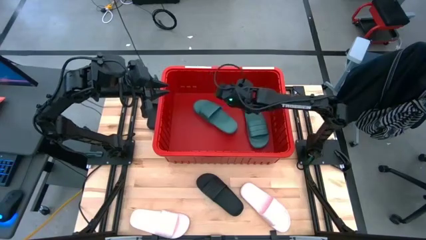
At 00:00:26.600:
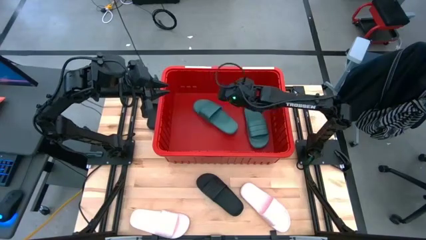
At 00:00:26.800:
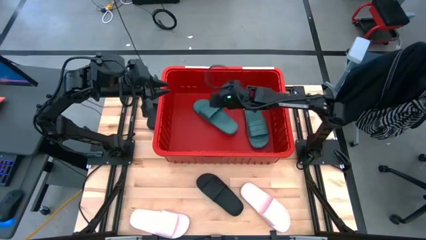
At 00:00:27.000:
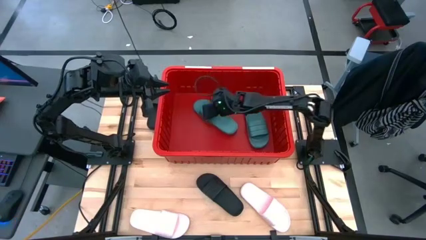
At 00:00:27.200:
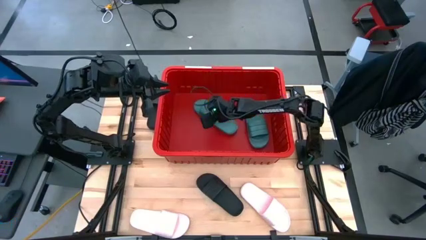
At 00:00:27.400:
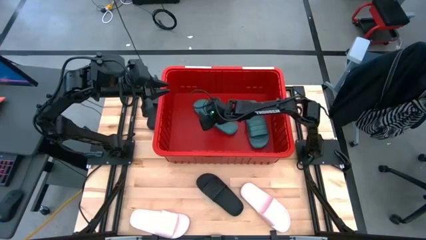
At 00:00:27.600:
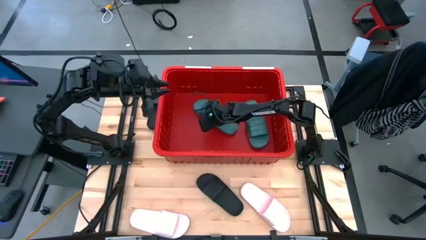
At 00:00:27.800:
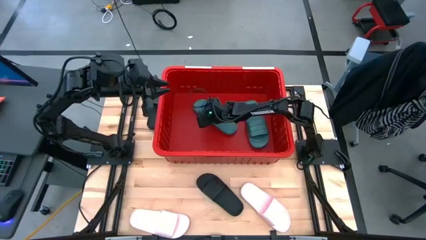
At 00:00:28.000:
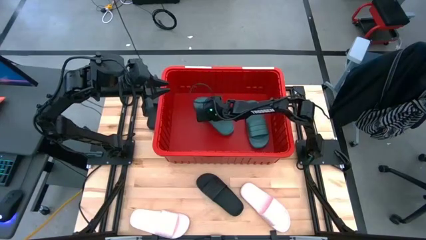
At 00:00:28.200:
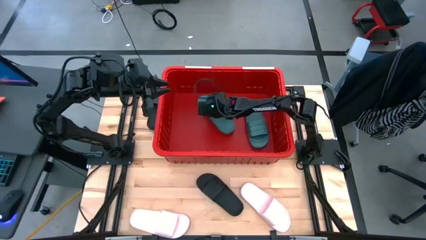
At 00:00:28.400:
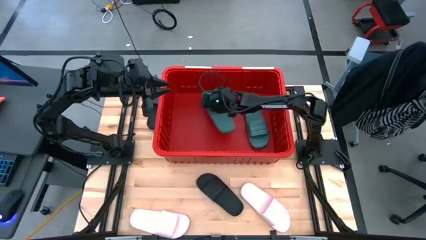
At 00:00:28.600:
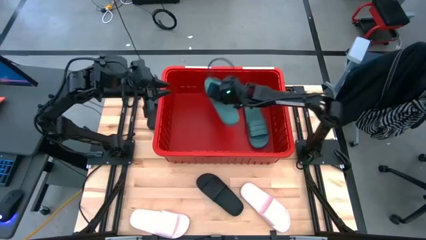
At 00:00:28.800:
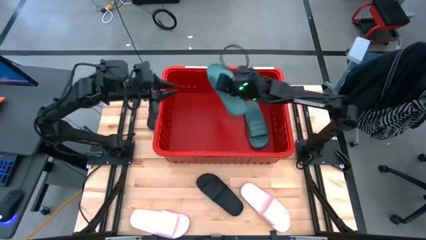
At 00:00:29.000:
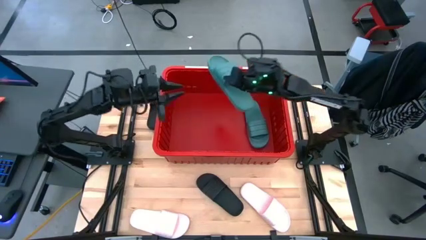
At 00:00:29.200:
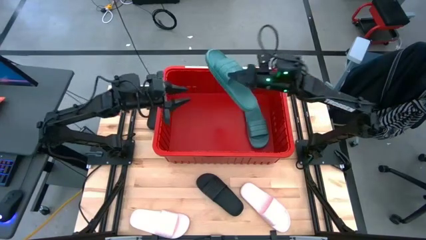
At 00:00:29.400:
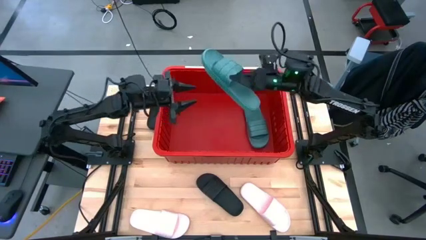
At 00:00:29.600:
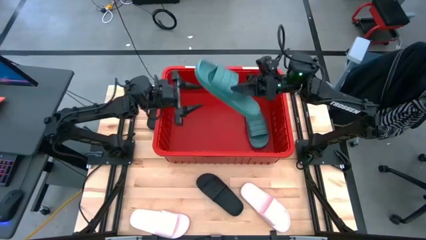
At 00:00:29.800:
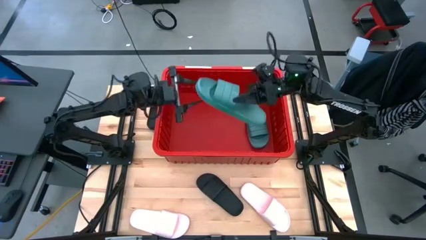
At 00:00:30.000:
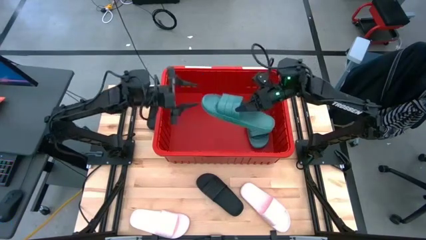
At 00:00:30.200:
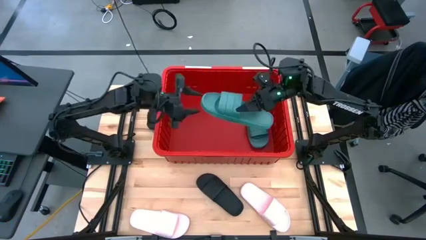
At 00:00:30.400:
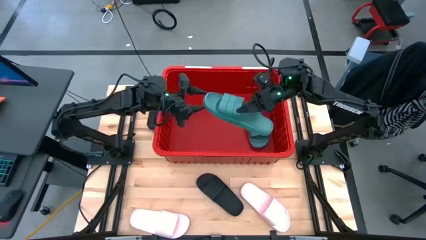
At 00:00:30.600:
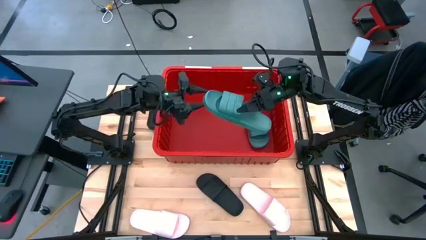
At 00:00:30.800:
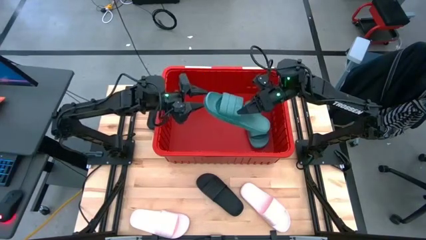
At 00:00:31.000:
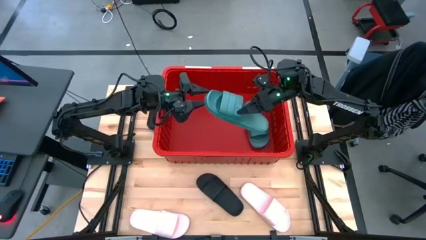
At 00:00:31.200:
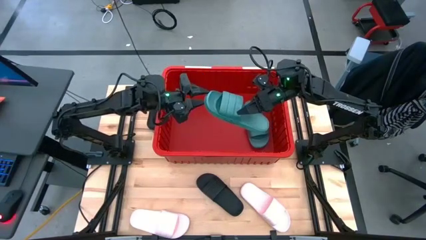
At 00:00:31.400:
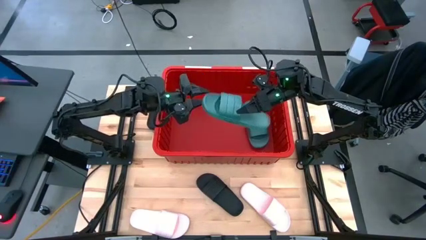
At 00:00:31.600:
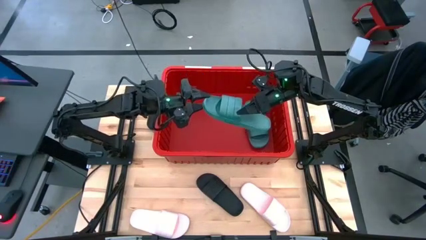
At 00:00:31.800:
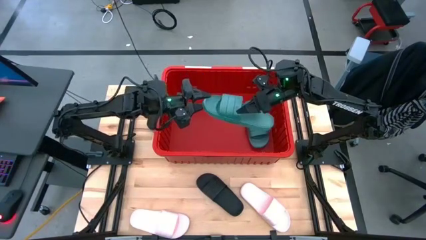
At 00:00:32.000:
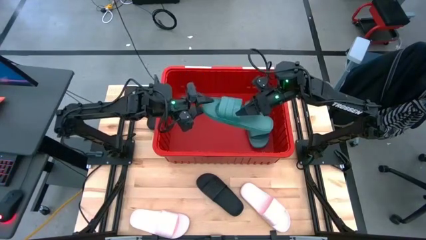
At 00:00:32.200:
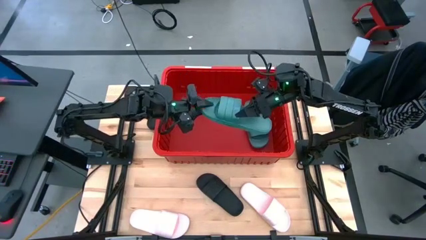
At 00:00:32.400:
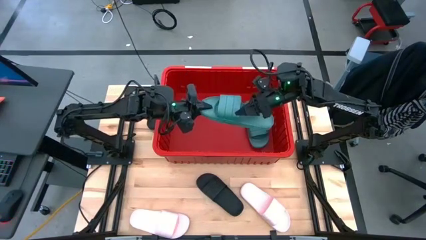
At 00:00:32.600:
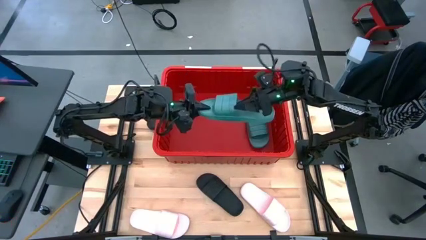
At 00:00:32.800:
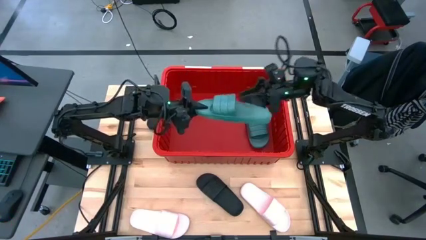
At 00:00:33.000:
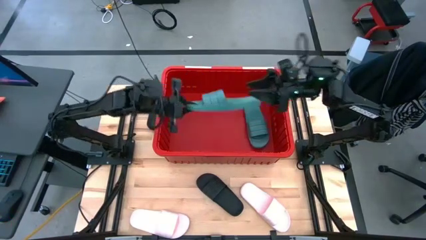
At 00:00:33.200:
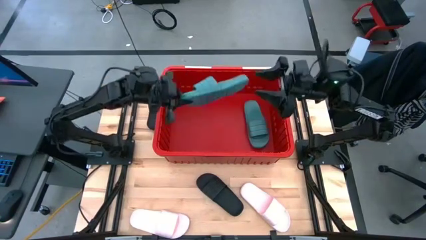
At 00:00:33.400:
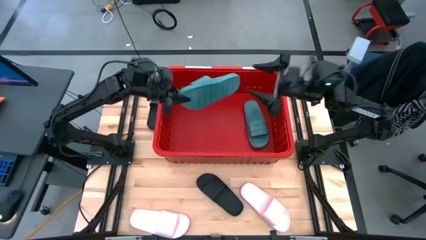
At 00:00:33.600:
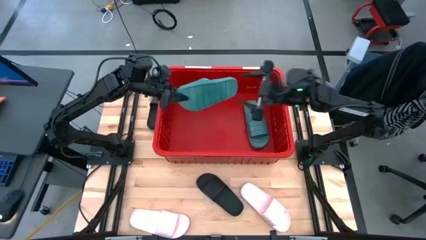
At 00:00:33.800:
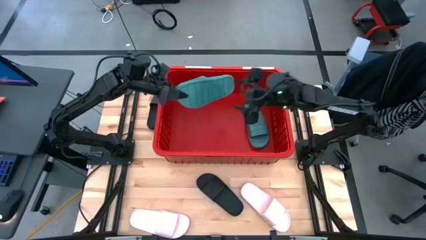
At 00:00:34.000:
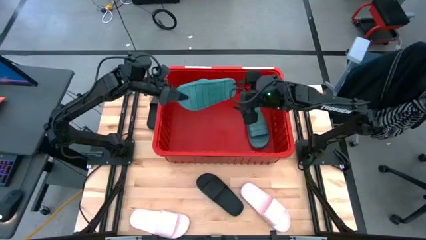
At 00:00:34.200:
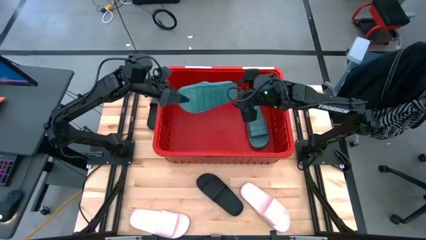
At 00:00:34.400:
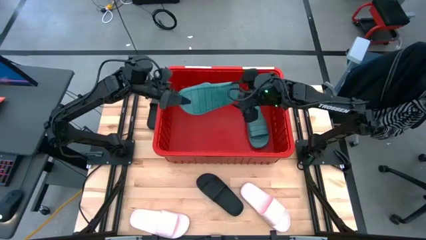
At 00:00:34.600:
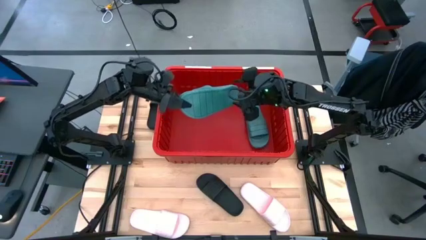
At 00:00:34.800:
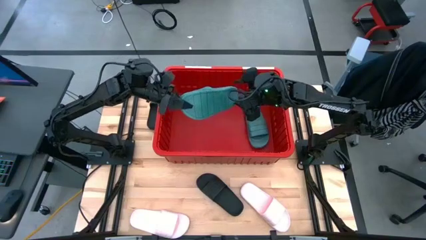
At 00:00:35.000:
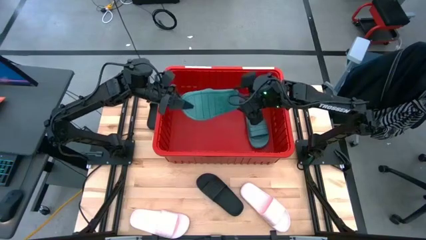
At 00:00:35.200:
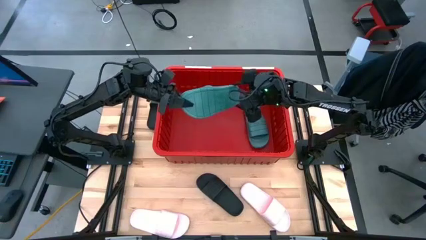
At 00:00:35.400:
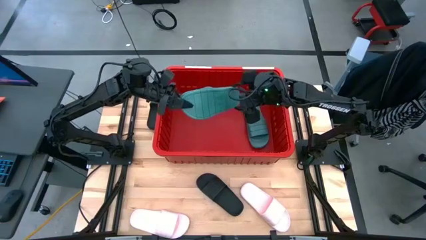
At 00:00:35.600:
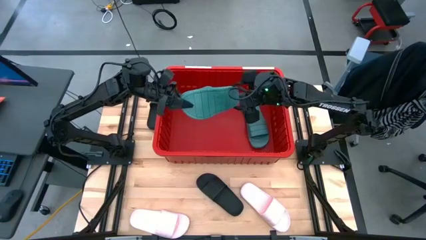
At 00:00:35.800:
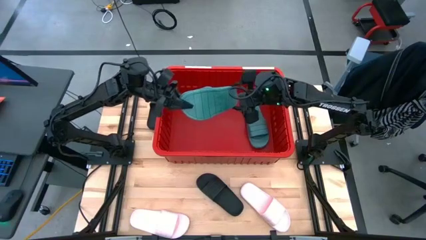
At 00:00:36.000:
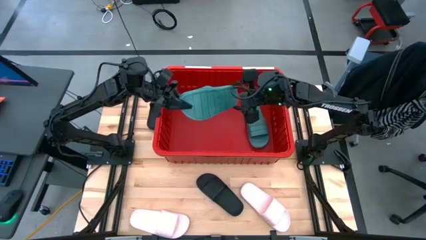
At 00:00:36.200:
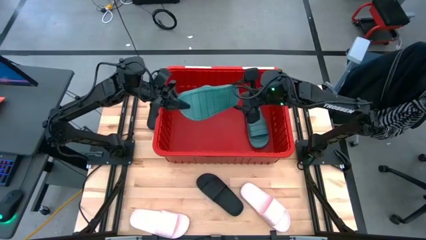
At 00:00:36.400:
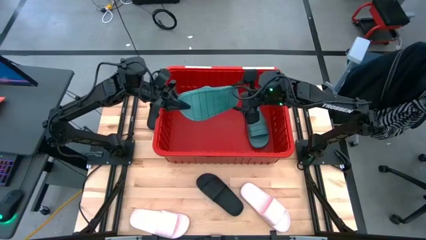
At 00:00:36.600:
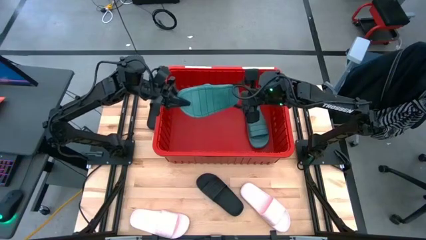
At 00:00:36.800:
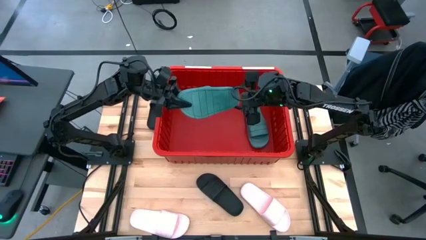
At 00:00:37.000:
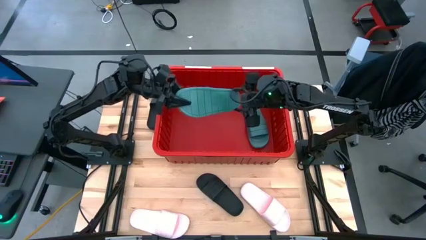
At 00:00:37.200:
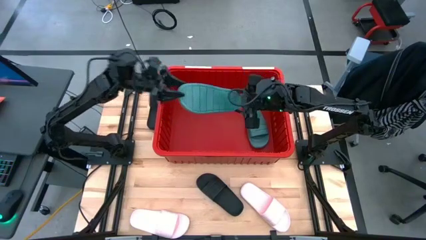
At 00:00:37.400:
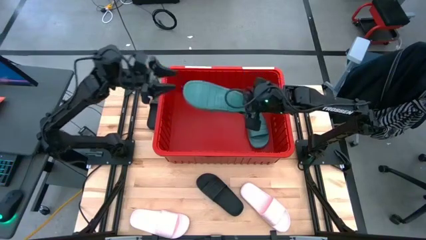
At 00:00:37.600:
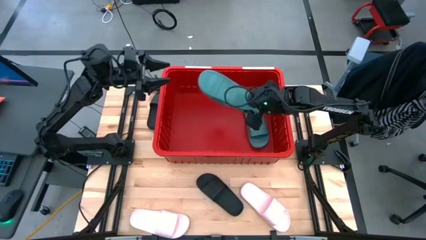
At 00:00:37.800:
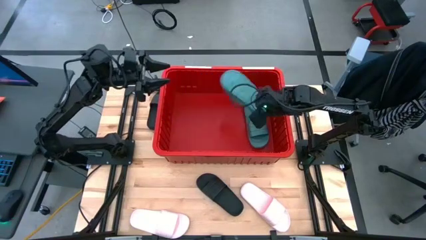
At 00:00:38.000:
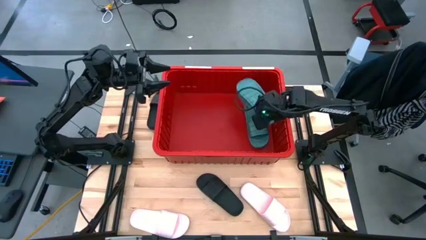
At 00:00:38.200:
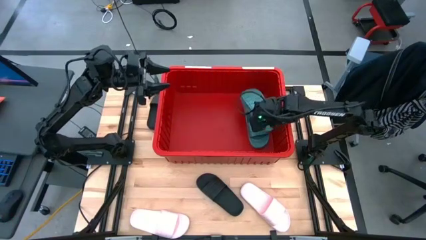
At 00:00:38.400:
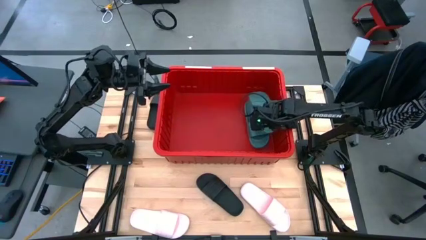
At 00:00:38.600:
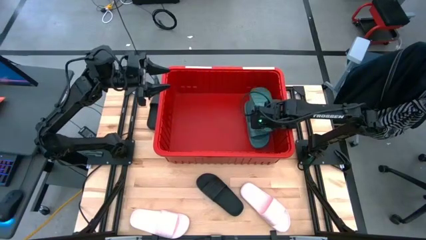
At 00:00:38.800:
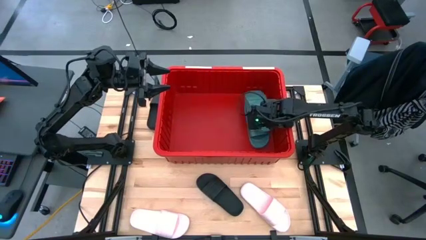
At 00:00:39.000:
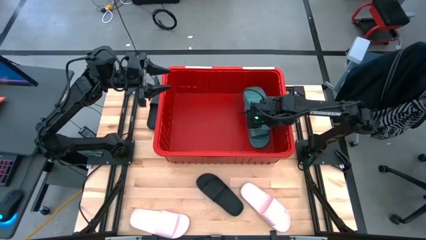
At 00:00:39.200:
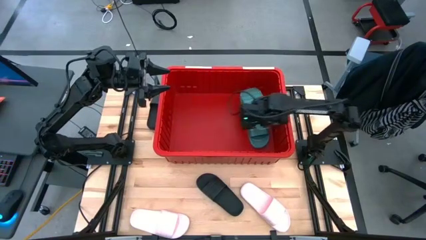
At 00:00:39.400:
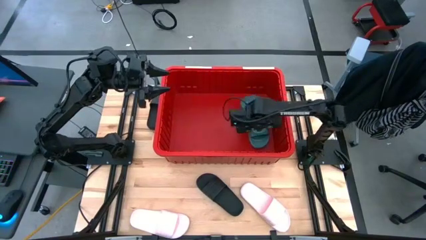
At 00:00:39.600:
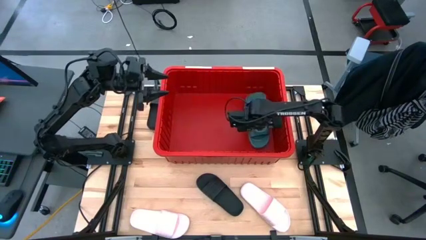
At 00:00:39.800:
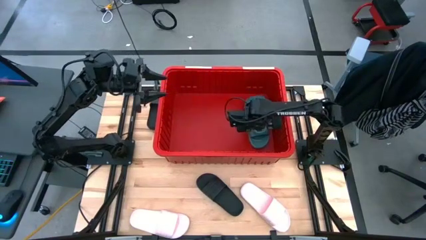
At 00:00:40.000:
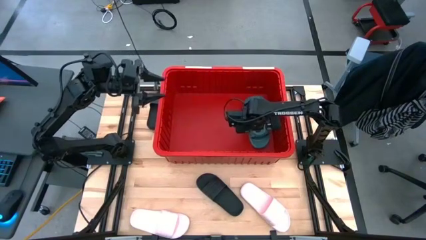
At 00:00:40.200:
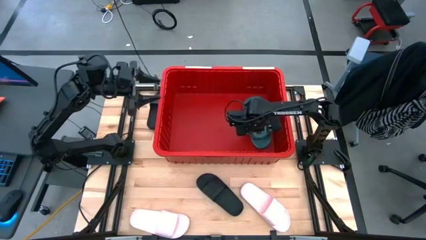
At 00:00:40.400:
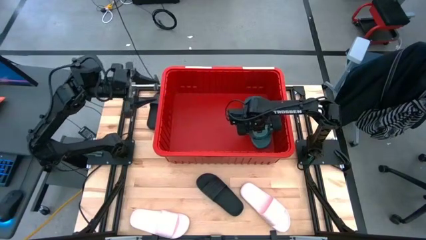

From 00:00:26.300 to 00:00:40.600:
Task: Pick and place slides into bin
Put the green slides into the red bin
